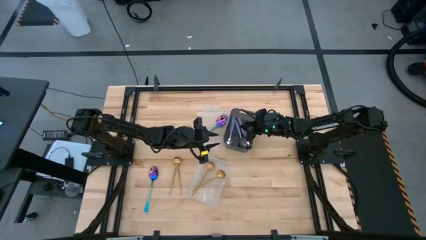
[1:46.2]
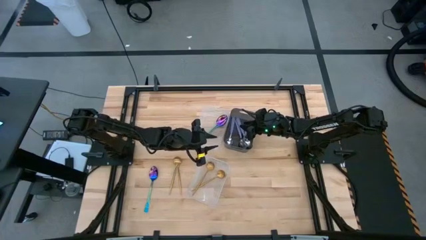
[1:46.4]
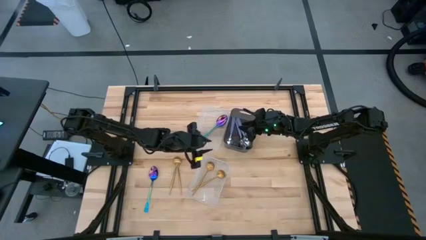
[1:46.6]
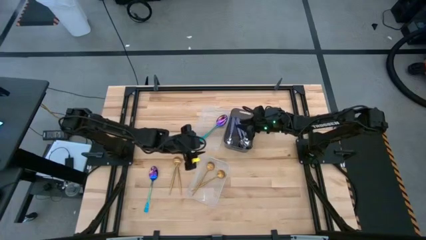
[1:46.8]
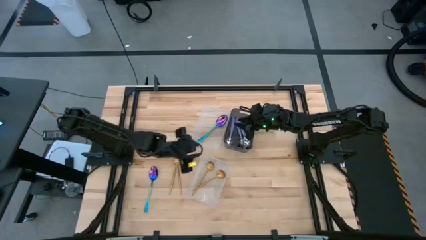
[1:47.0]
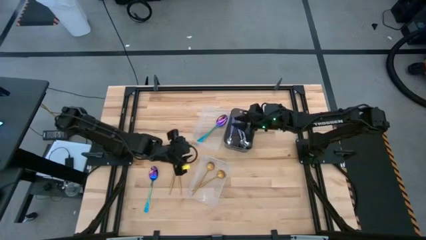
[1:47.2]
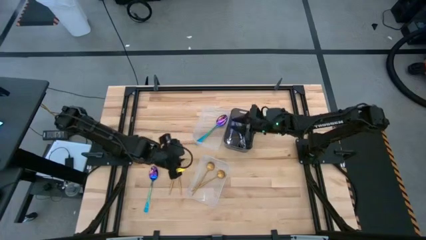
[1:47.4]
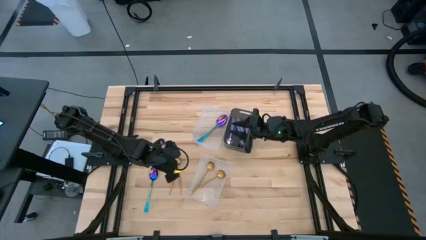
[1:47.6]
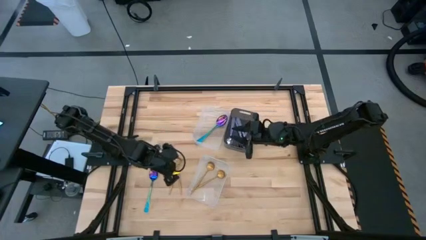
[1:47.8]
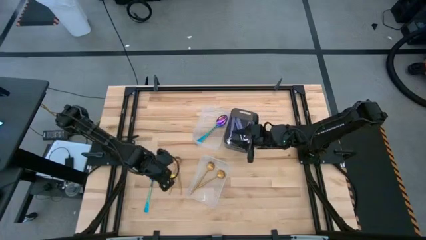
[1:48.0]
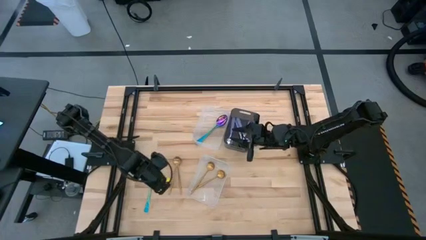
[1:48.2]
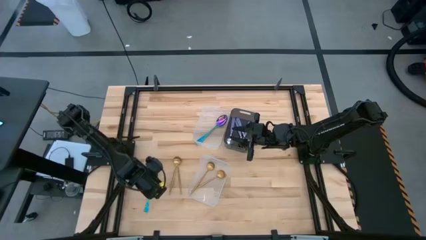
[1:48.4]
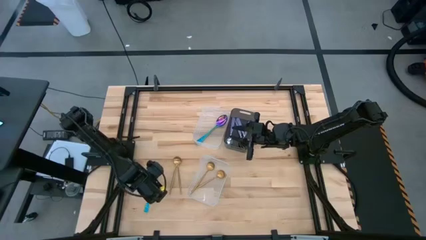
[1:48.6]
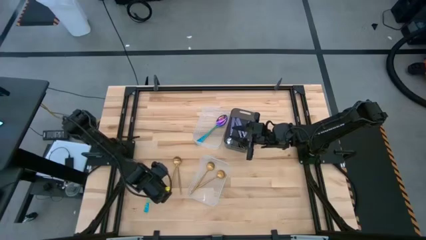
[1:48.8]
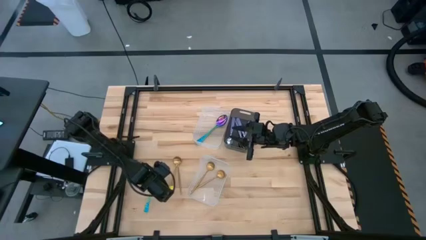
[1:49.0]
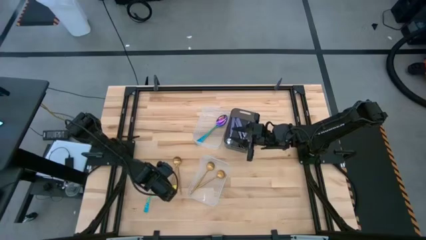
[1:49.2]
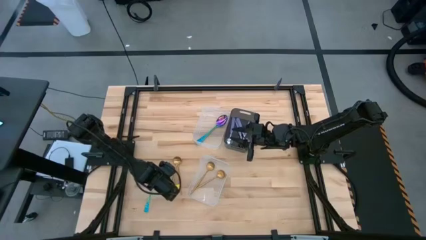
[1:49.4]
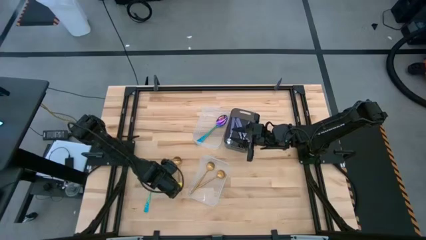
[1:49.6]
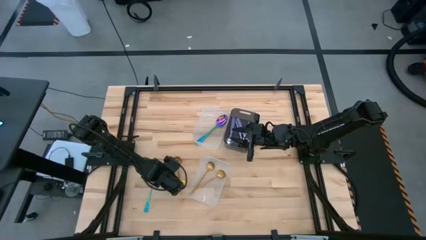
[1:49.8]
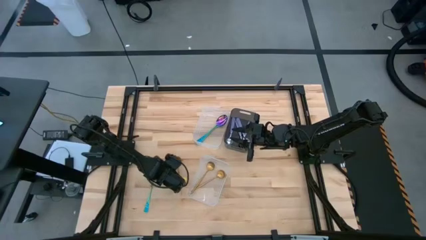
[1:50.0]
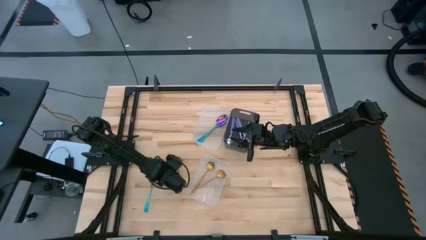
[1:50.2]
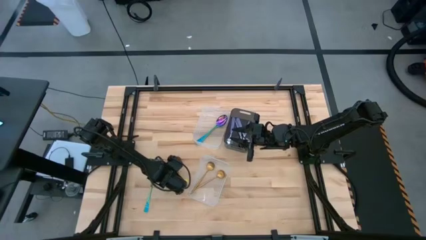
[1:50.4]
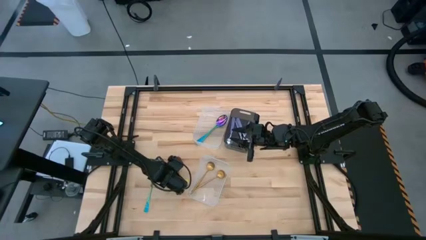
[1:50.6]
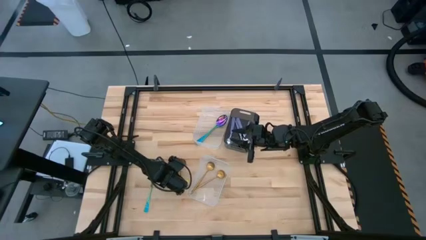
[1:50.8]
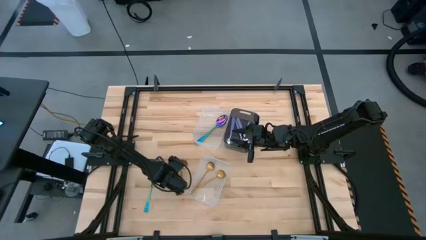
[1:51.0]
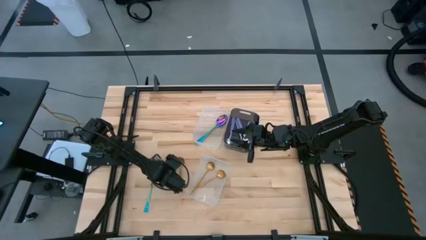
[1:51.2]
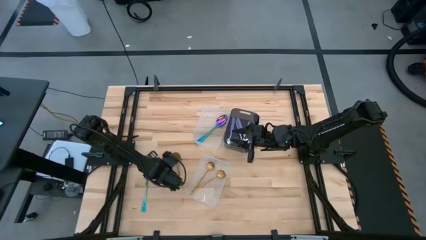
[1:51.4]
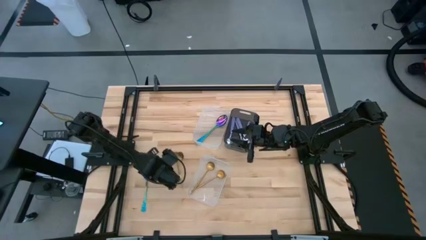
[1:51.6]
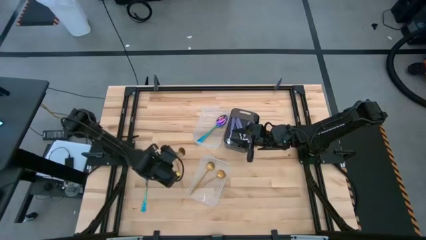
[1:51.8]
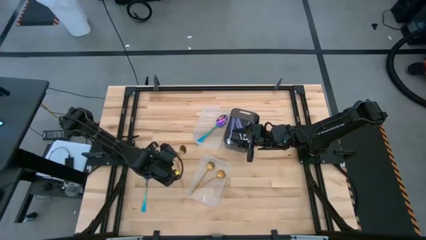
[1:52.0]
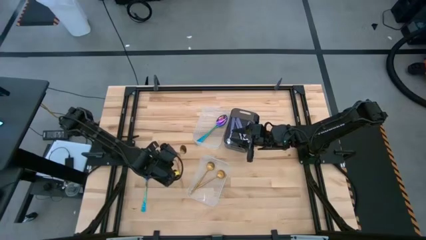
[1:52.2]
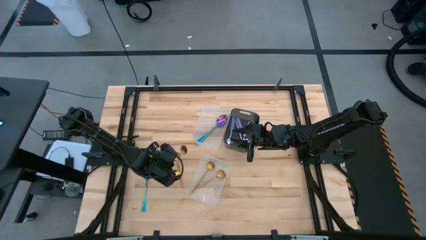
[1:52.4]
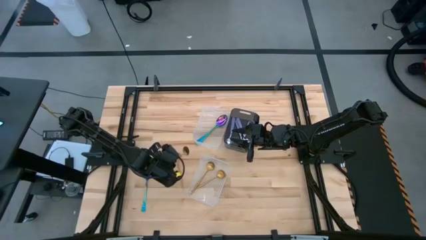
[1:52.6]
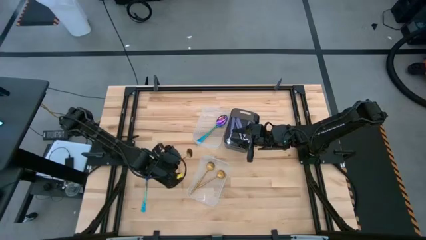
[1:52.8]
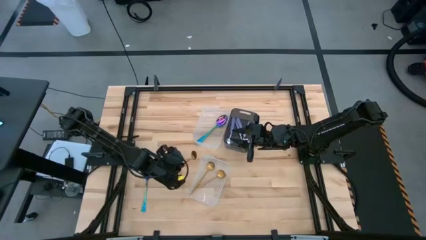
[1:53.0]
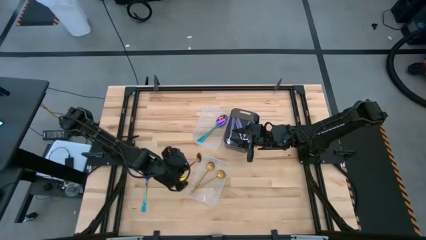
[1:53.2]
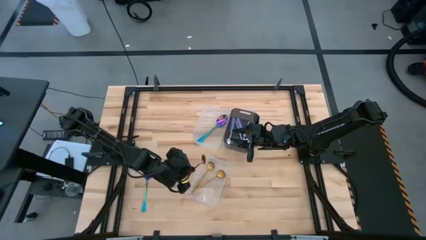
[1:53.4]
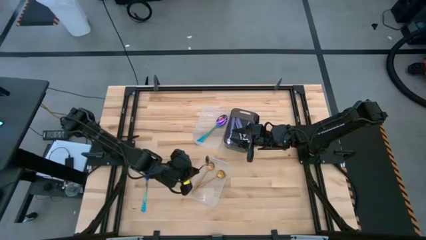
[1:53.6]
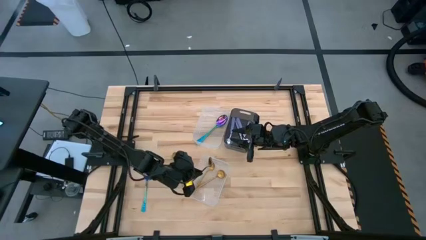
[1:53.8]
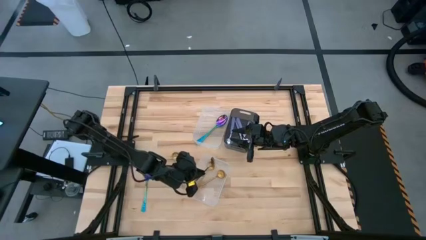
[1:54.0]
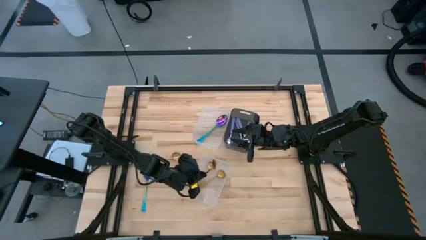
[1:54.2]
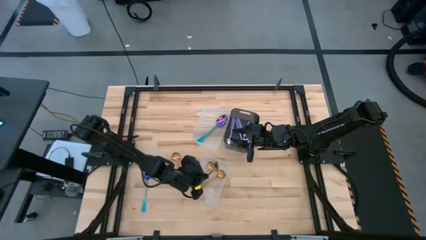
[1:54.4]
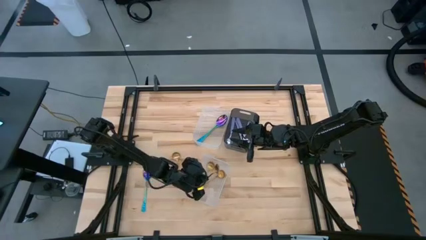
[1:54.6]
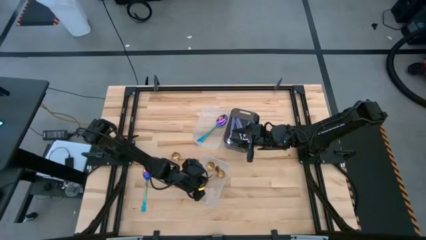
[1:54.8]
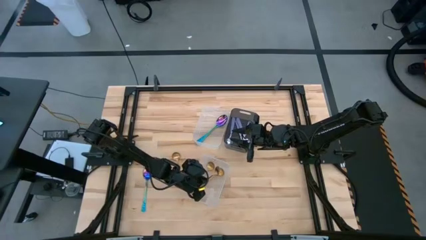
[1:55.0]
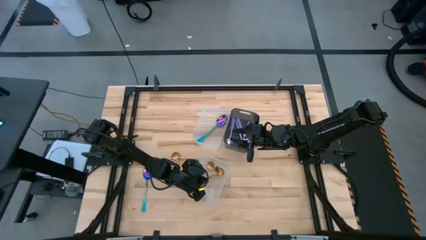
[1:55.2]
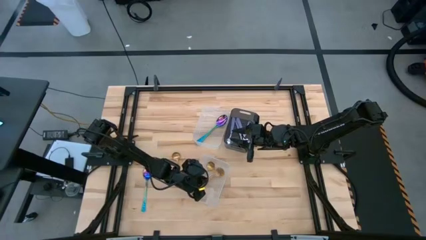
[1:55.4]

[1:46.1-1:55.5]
Task: Sort silverware by color (type)
Put the gold spoon into the bottom transparent bin

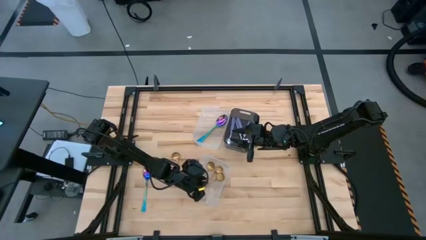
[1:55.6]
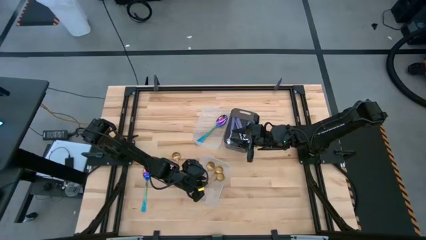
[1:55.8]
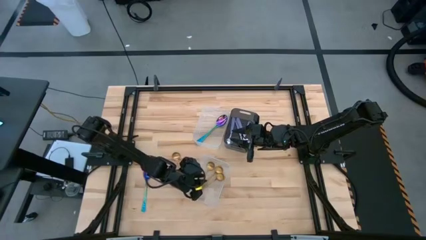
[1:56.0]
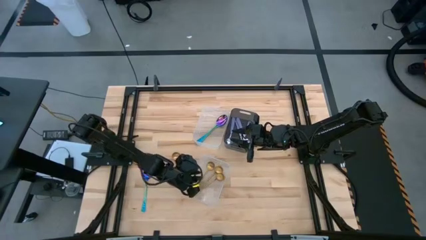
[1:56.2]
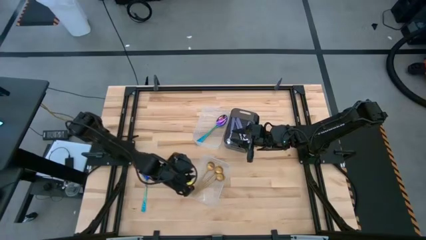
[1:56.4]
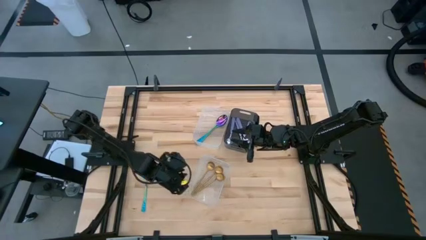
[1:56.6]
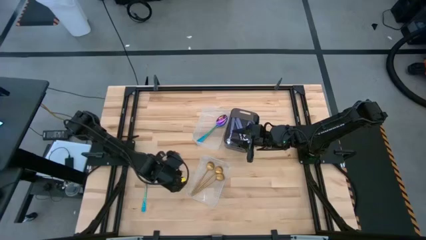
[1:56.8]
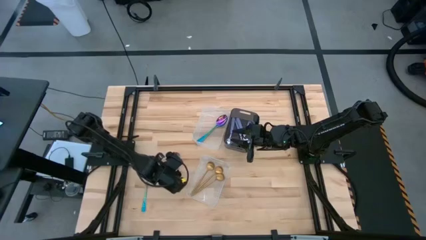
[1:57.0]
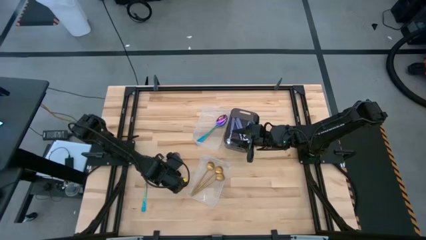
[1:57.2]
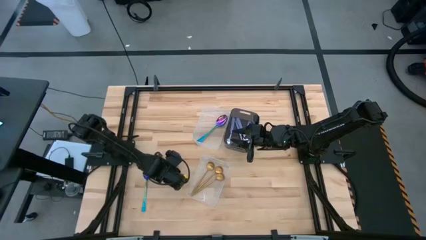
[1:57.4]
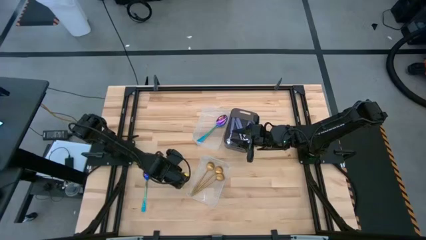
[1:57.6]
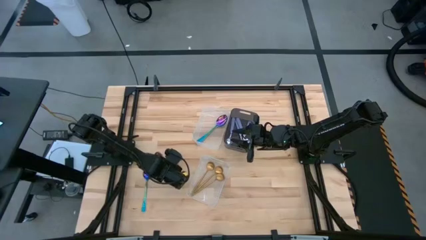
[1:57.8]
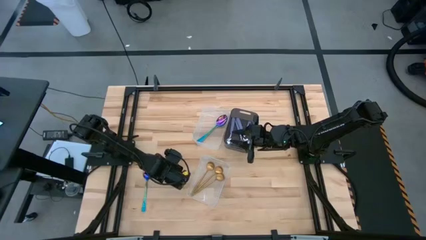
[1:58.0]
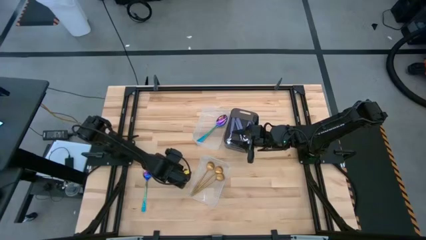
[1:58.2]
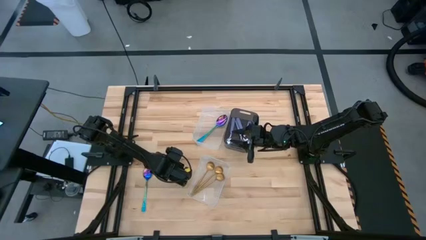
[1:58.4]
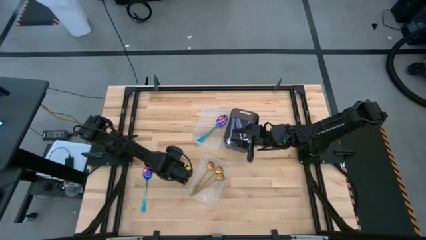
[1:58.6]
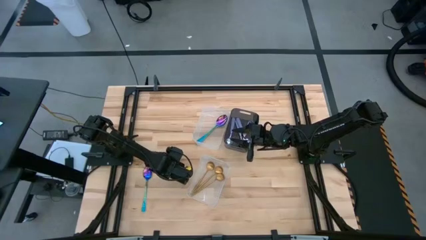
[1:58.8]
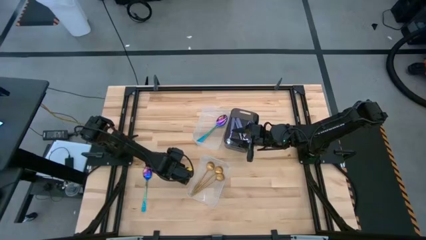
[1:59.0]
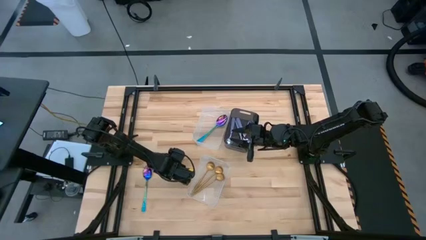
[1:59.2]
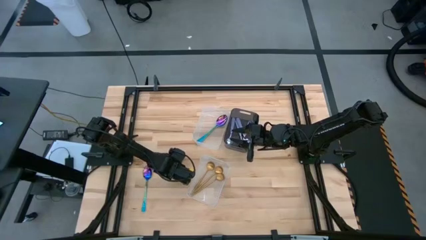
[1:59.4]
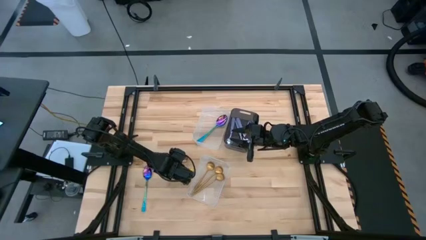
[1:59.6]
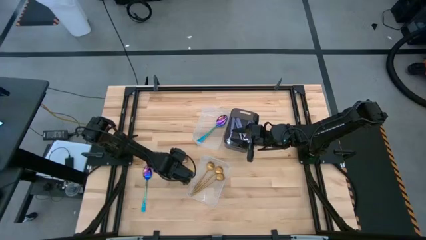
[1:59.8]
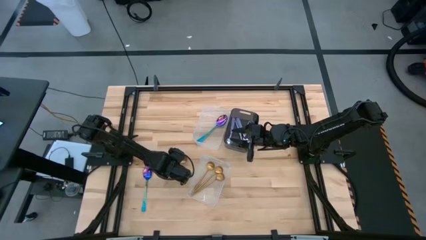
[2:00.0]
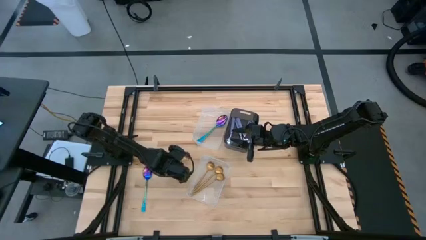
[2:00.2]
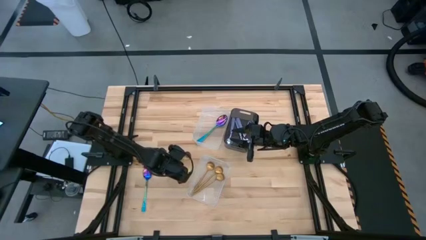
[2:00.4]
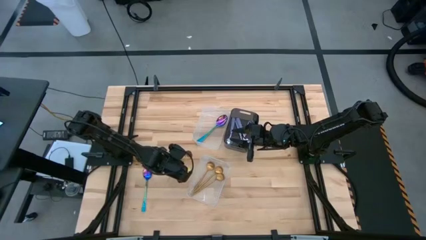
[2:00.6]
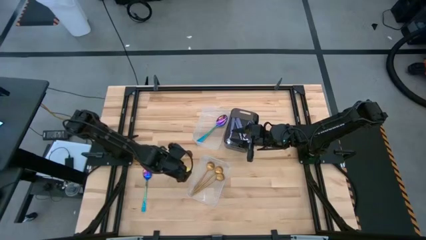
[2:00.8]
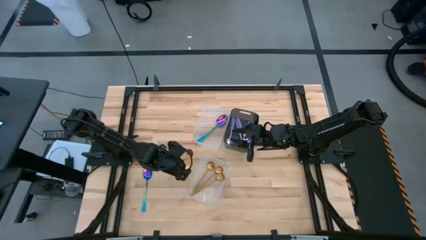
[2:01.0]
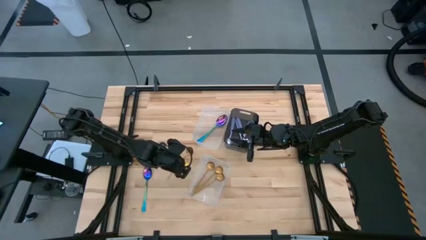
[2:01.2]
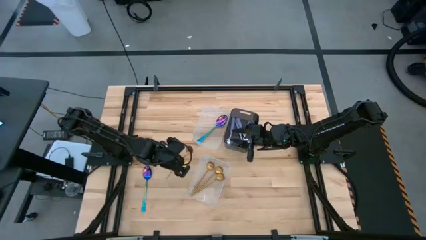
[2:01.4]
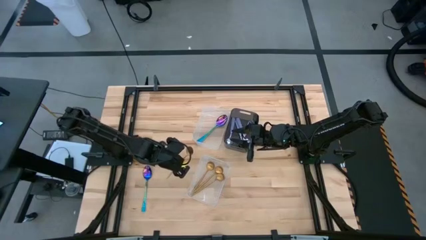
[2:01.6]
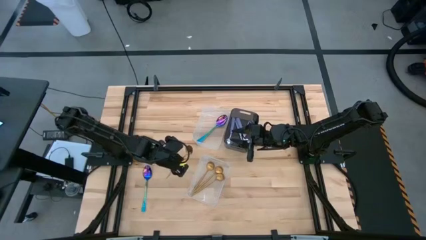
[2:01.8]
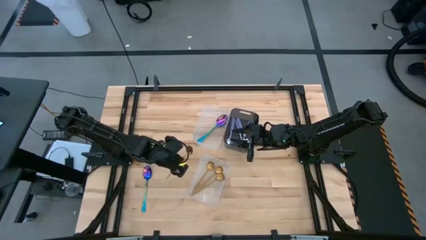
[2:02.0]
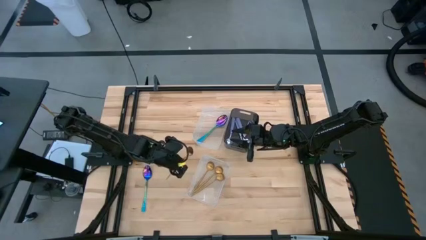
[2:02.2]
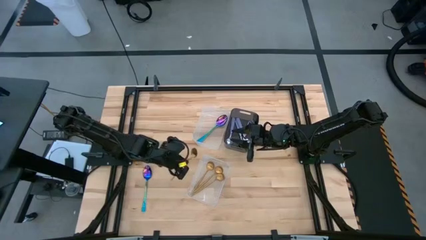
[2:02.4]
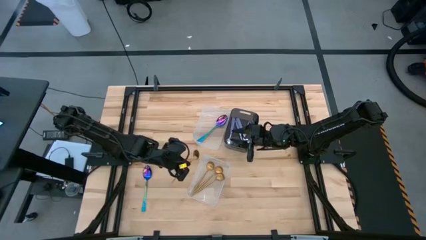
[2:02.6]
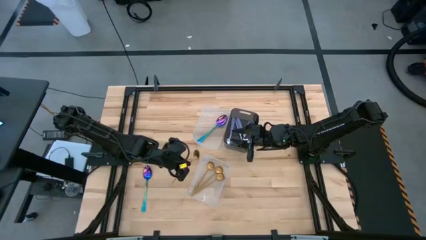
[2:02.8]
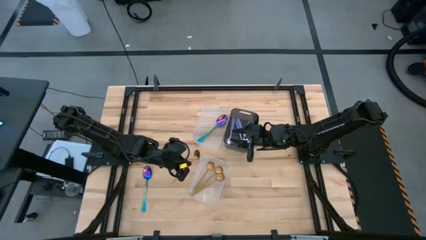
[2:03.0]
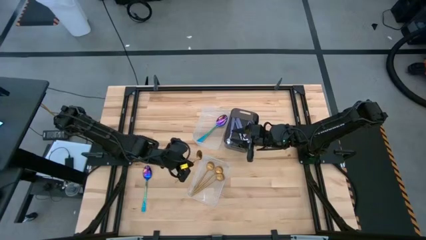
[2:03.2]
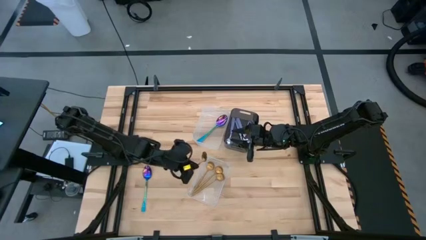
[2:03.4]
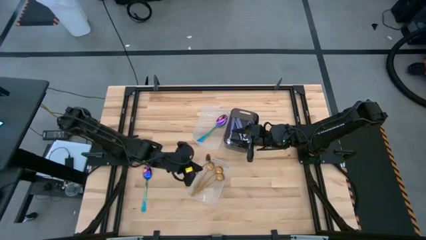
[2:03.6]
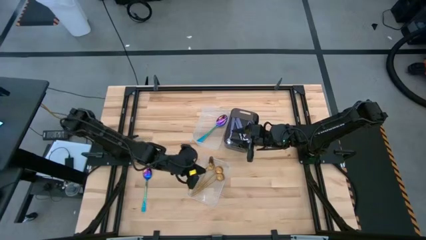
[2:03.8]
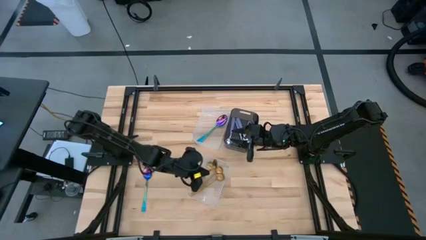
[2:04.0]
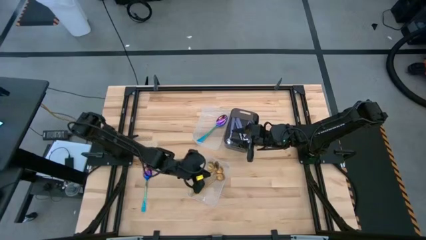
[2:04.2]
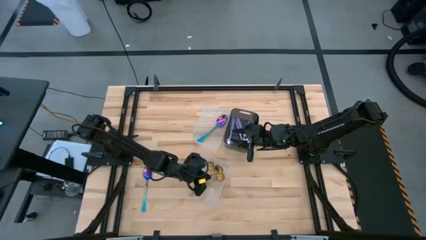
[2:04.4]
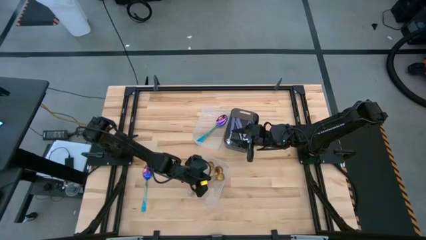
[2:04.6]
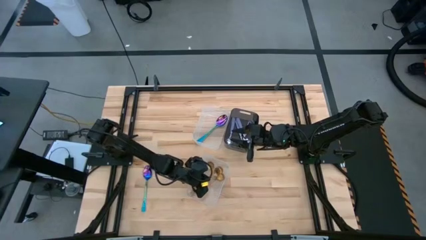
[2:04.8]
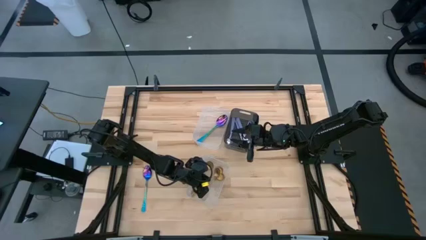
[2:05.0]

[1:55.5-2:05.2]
Put the gold spoon into the bottom transparent bin
